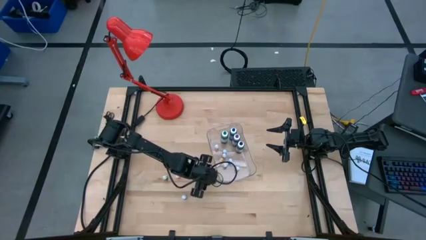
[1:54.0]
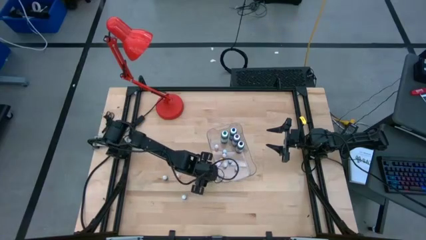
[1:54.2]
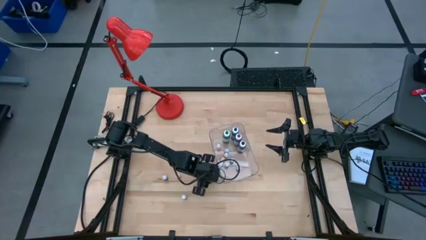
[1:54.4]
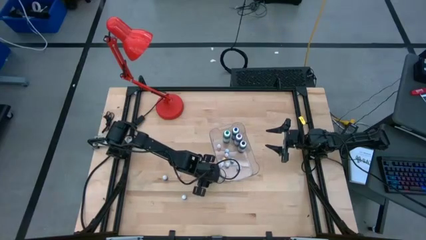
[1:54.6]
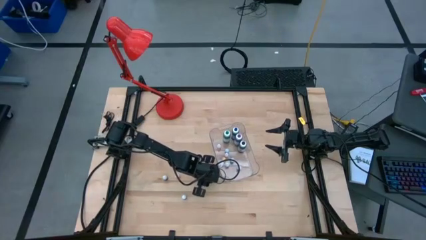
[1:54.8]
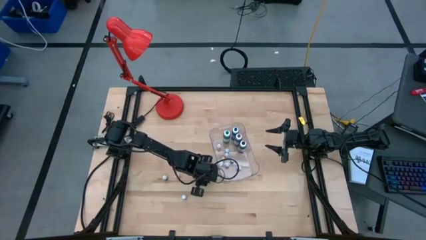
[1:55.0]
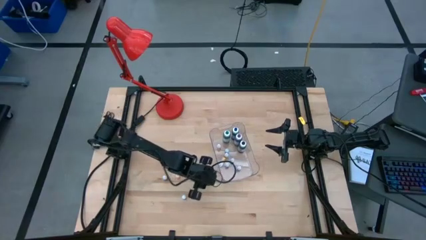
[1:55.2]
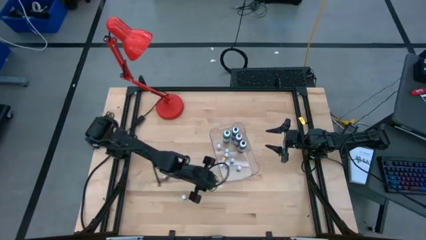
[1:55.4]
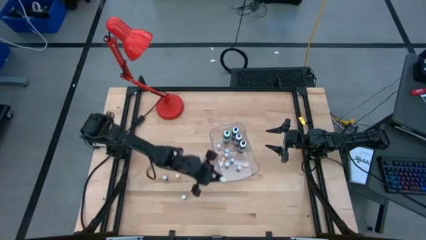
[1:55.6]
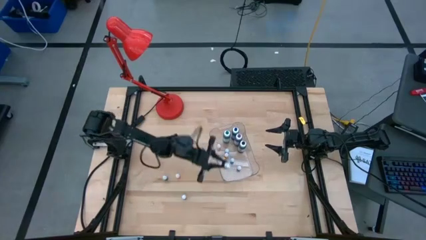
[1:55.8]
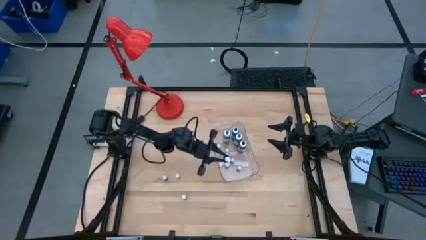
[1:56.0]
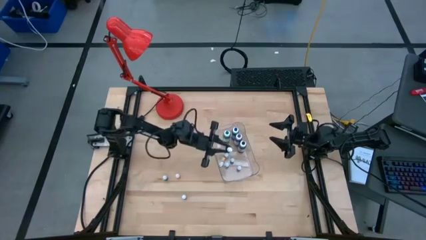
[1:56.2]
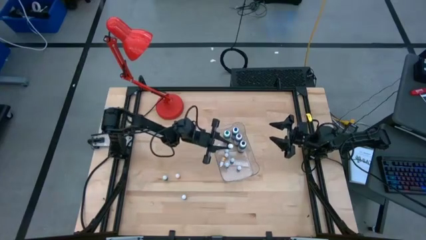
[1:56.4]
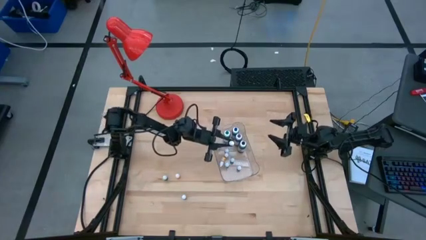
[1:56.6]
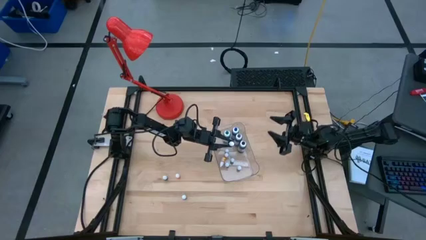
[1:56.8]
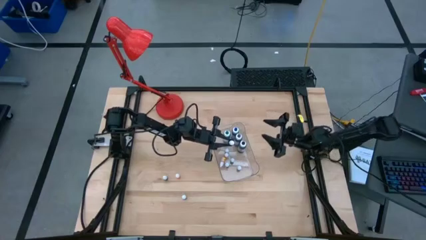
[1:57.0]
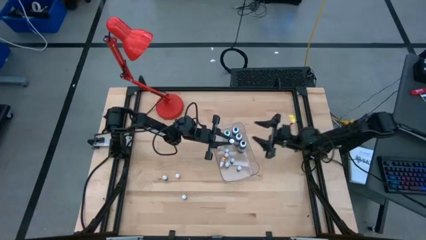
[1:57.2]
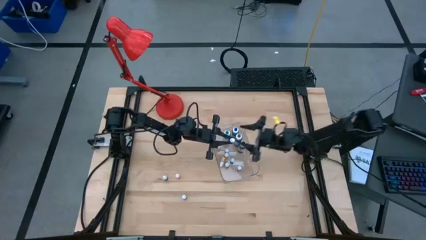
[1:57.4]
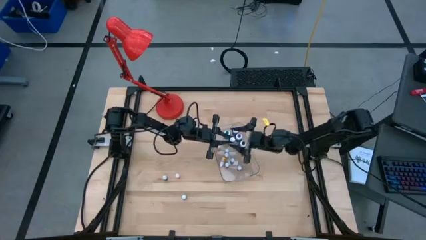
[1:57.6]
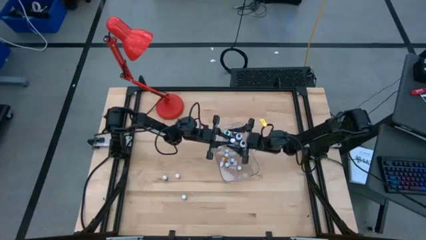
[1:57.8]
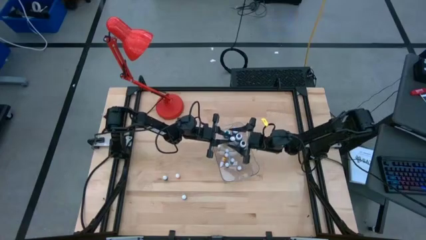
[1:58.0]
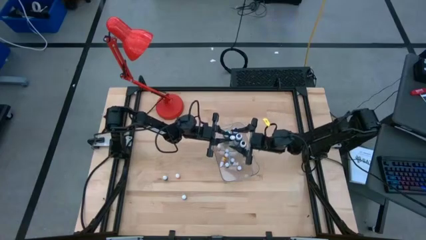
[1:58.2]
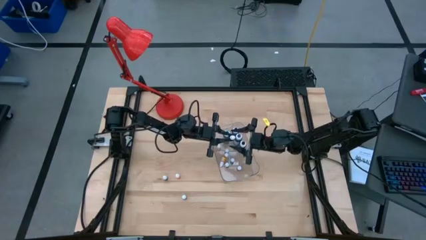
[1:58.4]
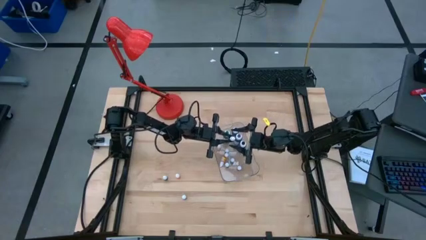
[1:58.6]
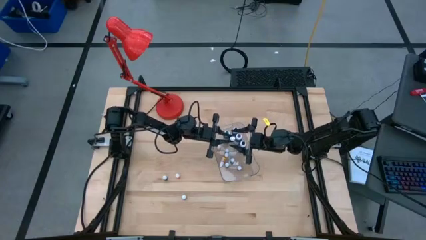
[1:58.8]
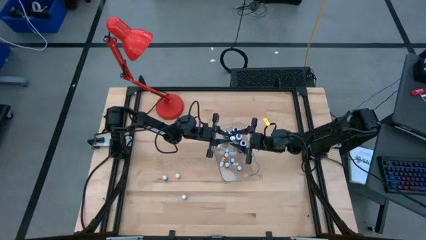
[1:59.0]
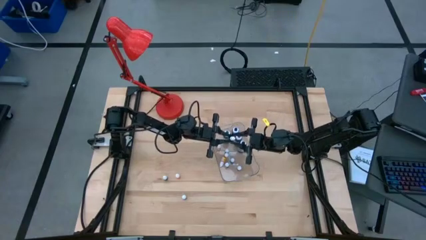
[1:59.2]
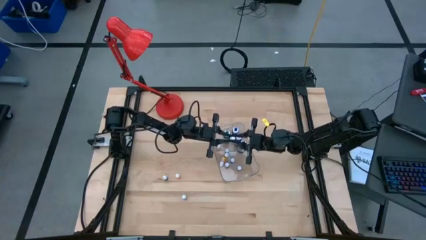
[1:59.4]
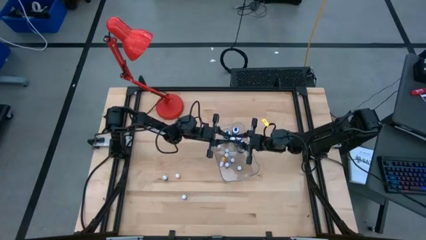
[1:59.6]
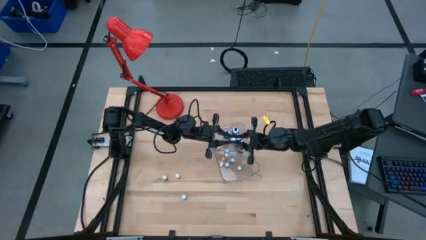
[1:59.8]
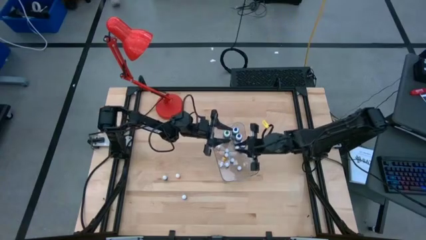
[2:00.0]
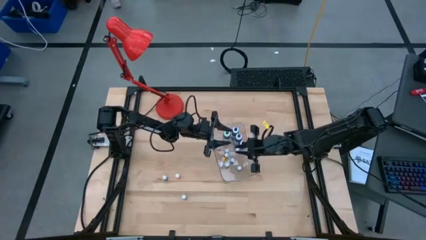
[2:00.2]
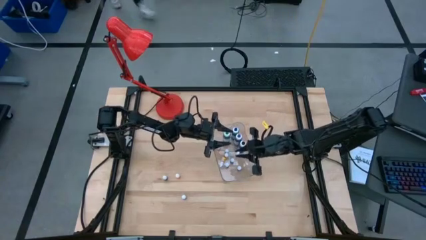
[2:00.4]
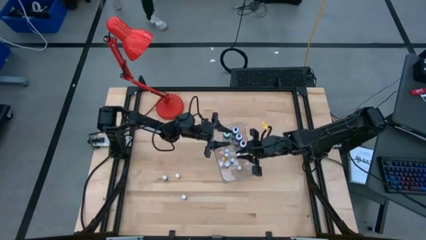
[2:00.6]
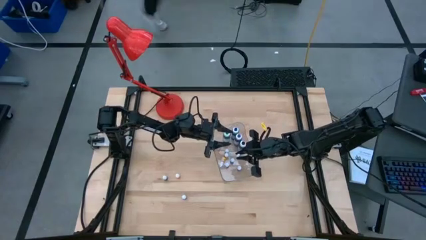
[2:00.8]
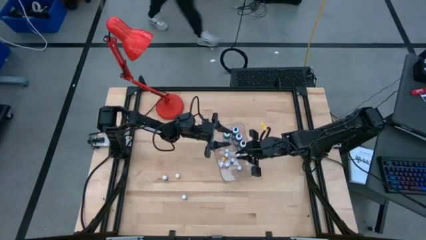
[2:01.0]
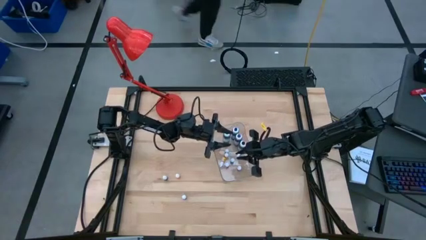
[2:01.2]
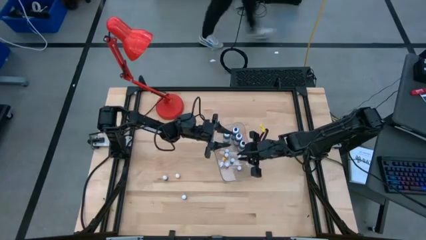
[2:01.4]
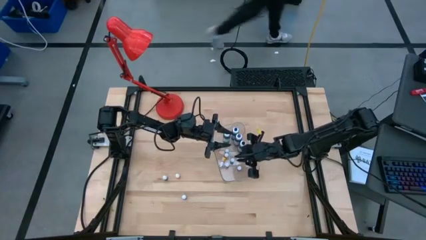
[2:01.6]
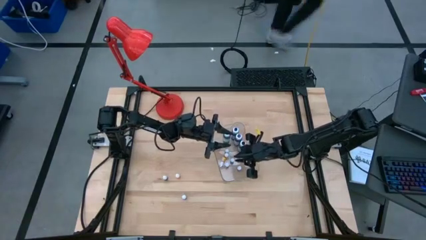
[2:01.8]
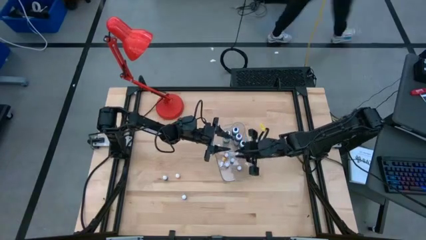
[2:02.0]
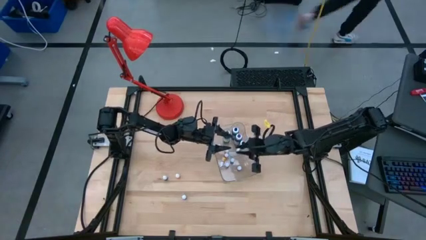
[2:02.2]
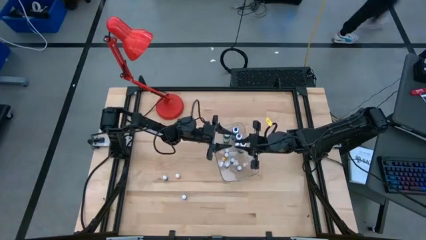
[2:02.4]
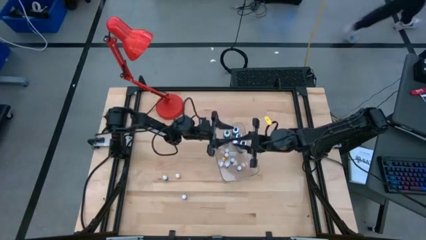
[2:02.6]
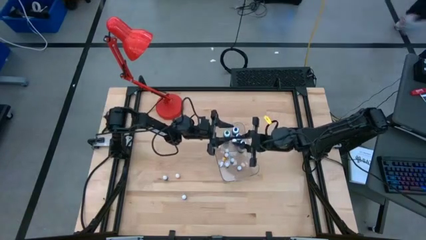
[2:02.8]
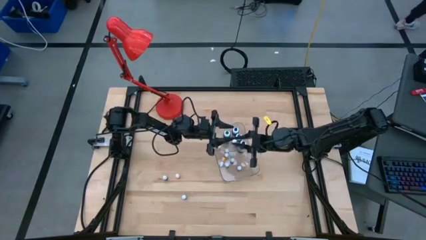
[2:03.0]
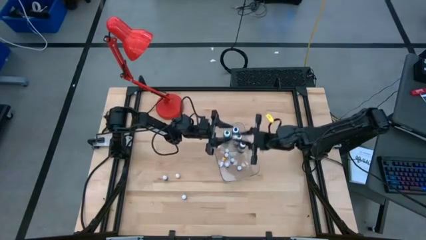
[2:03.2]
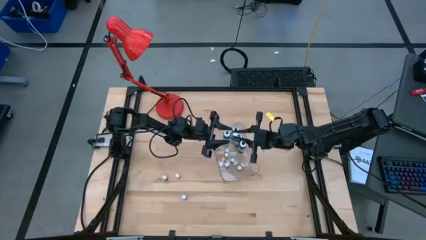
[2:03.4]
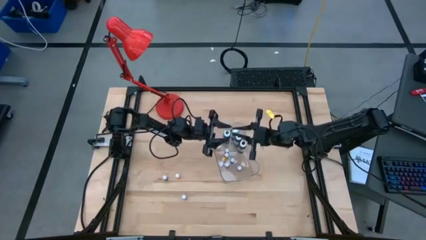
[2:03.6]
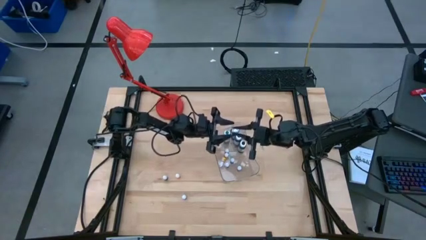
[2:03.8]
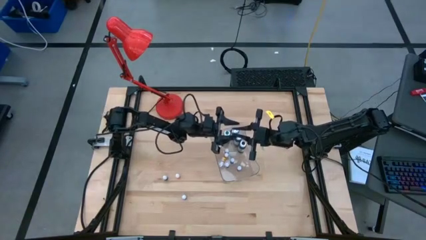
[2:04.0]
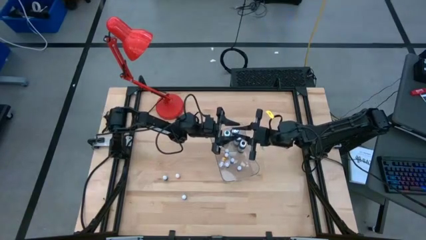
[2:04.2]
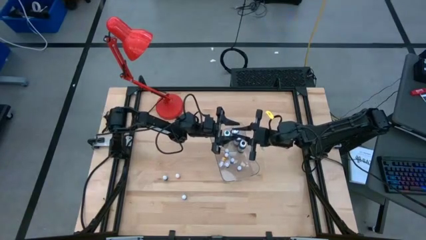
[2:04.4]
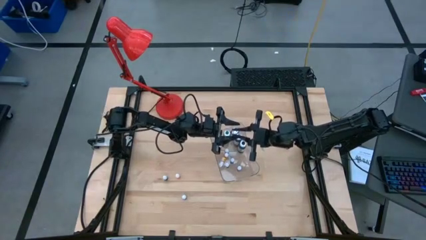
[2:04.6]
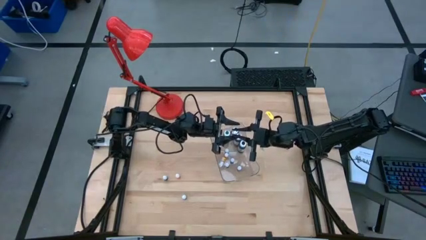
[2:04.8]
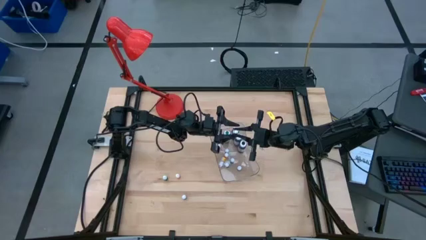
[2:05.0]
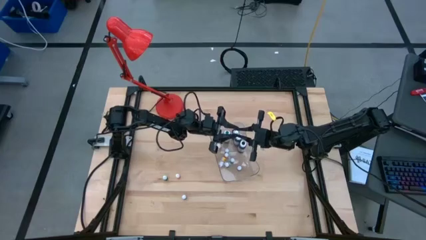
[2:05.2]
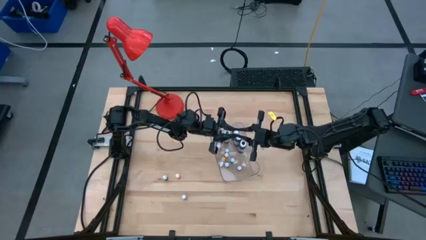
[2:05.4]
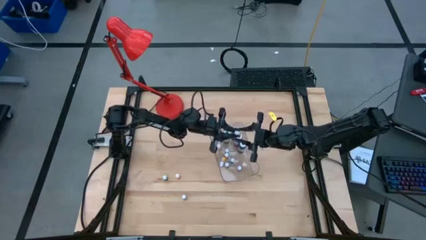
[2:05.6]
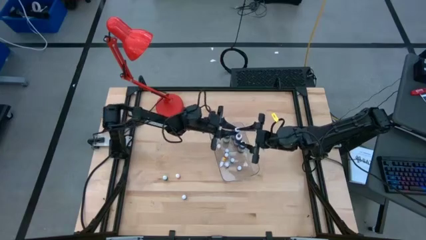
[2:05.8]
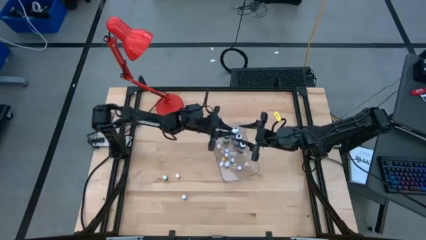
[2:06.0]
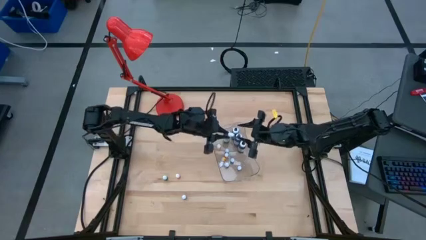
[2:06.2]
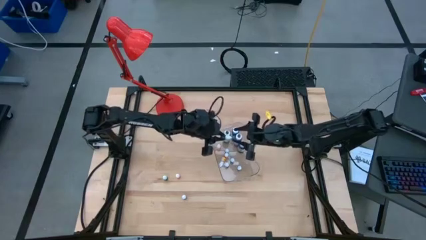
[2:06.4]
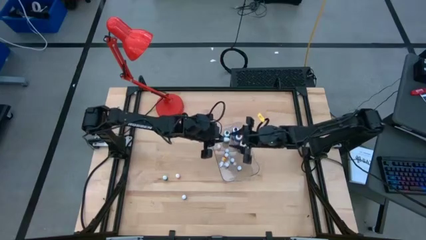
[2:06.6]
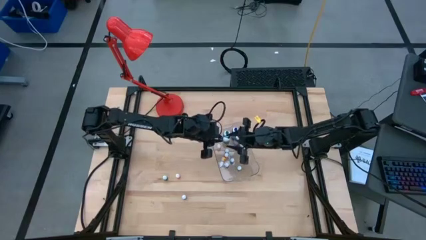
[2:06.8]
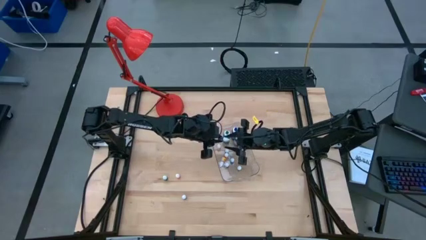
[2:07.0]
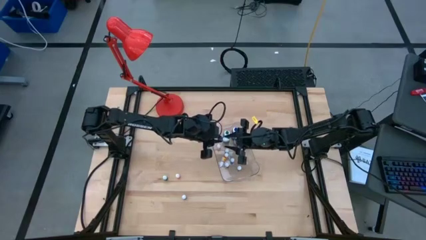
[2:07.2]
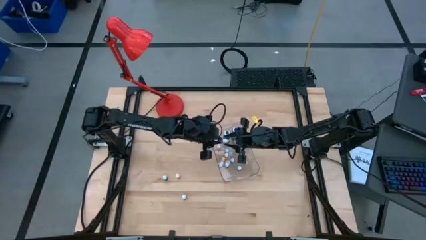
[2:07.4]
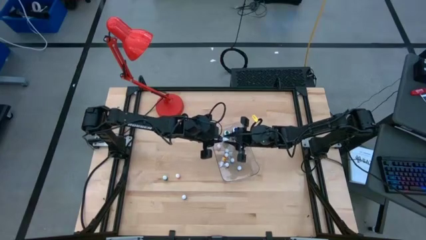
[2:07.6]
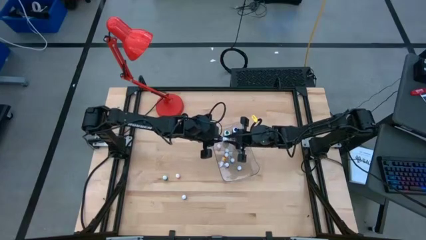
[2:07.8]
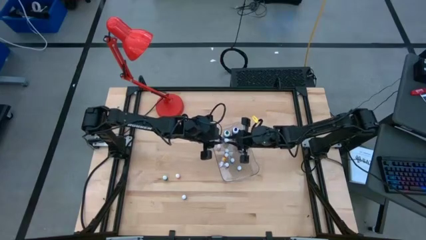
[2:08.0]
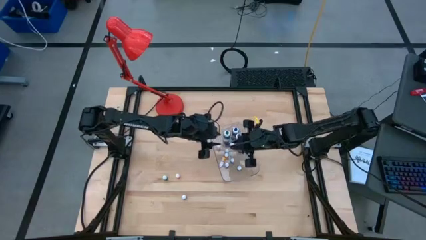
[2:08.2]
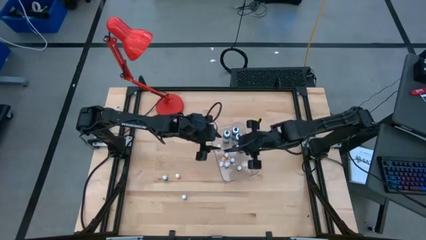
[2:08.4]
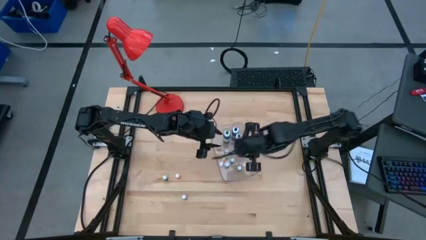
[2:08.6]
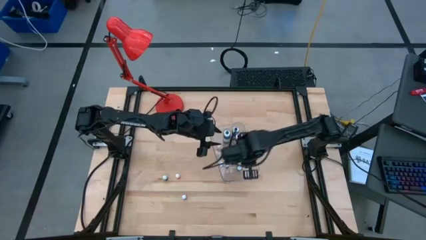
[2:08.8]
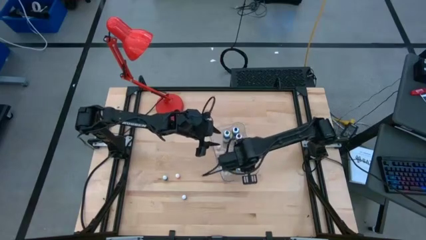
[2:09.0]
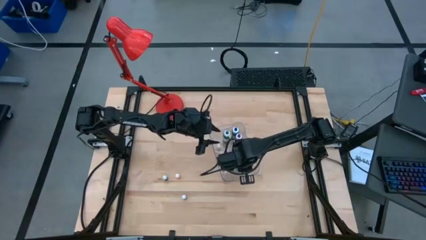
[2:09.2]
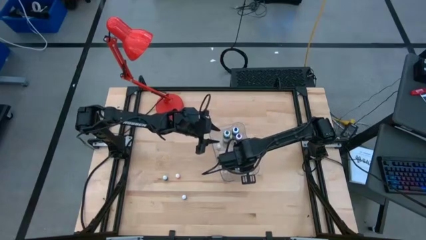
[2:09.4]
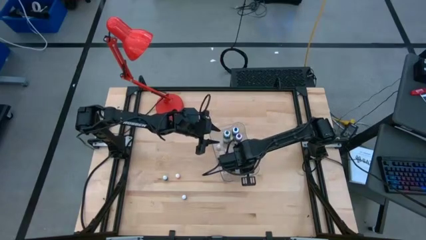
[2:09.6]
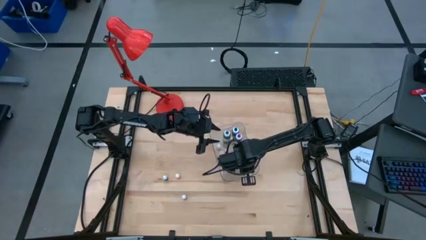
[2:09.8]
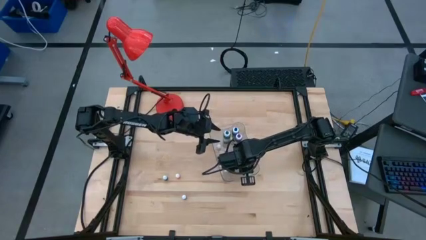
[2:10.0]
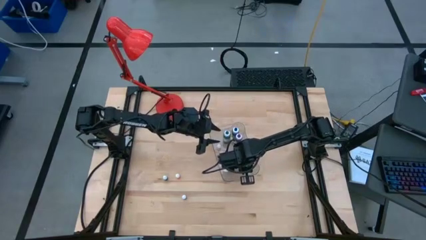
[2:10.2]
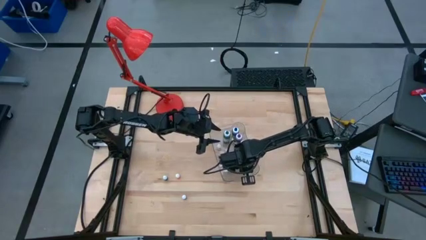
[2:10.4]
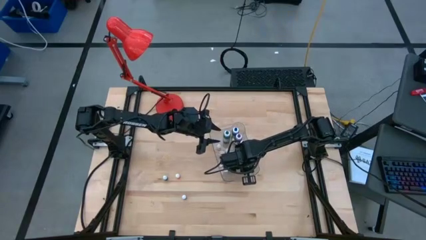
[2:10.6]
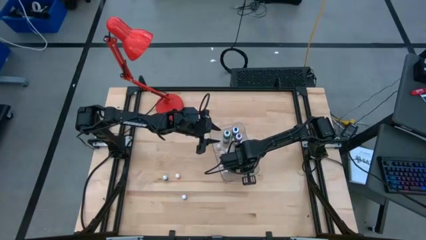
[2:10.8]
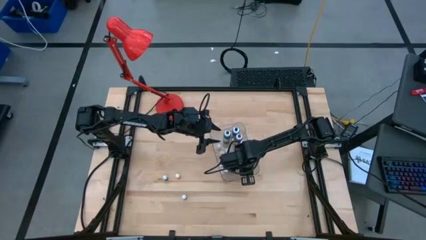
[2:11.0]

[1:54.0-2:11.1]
Task: Pick & Place food coloring
Put the purple food coloring bottle into the transparent container
